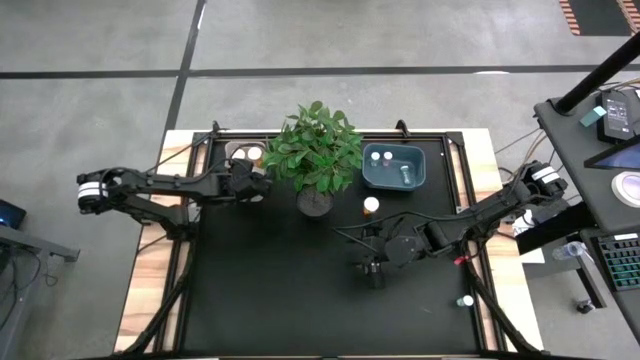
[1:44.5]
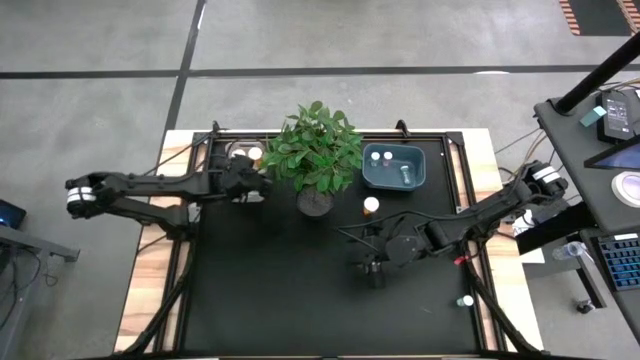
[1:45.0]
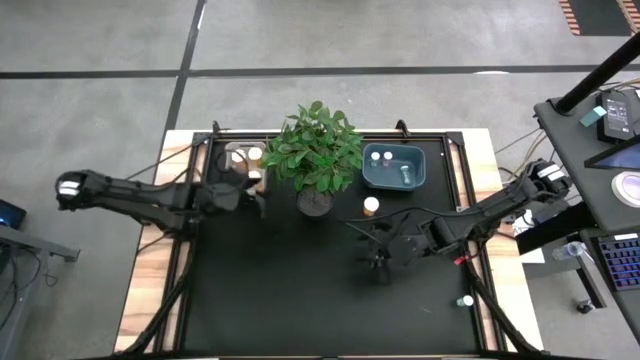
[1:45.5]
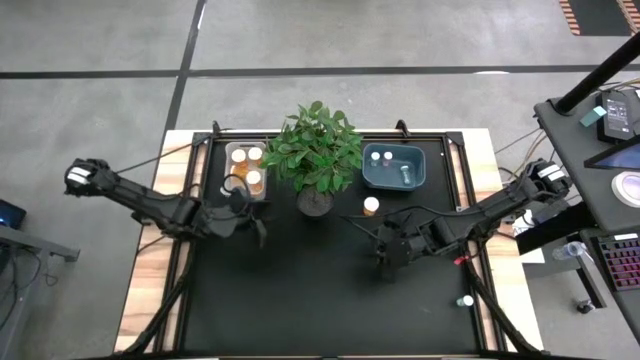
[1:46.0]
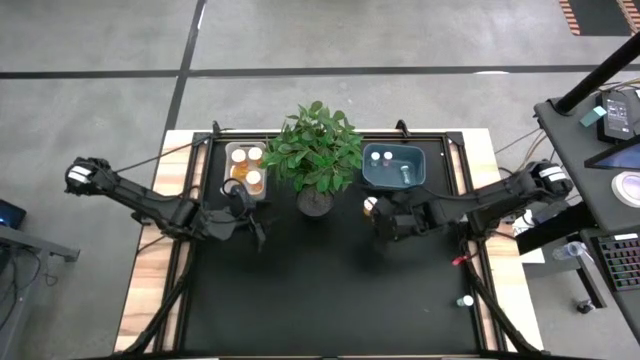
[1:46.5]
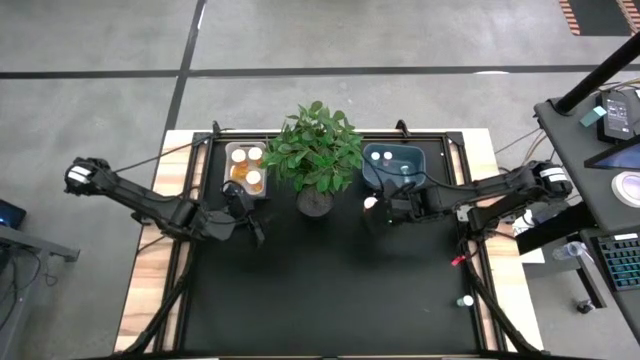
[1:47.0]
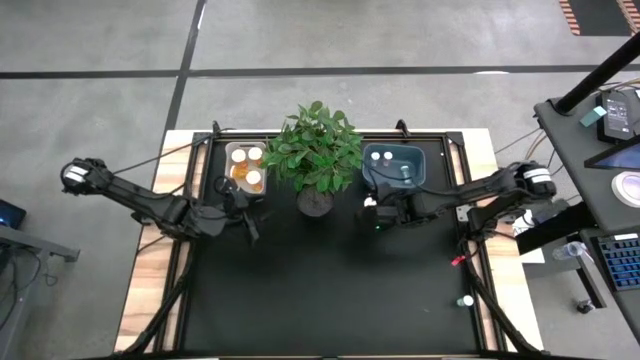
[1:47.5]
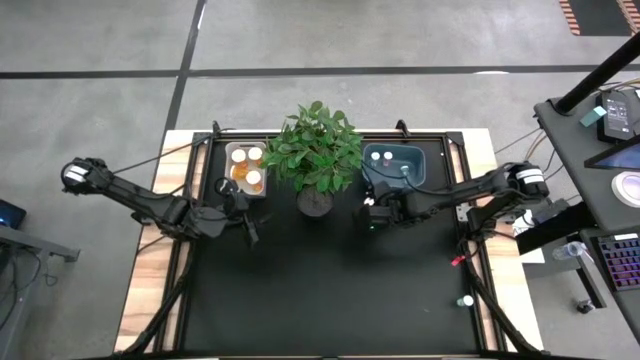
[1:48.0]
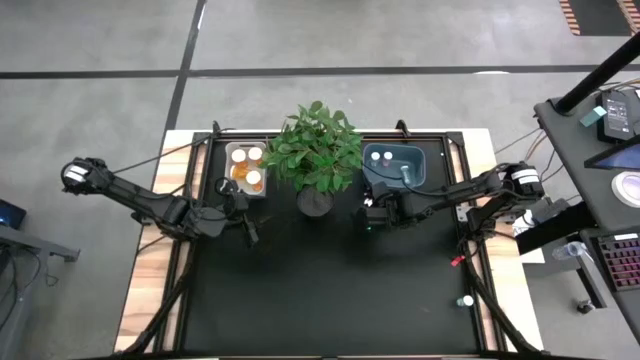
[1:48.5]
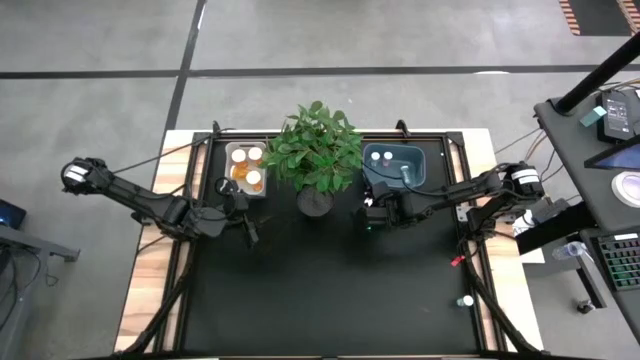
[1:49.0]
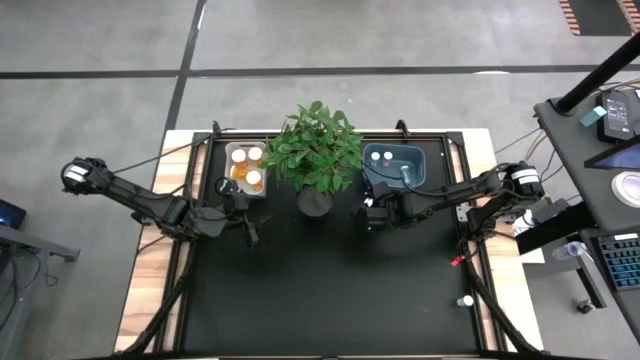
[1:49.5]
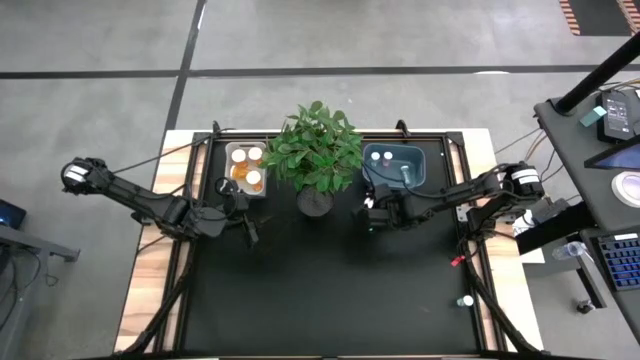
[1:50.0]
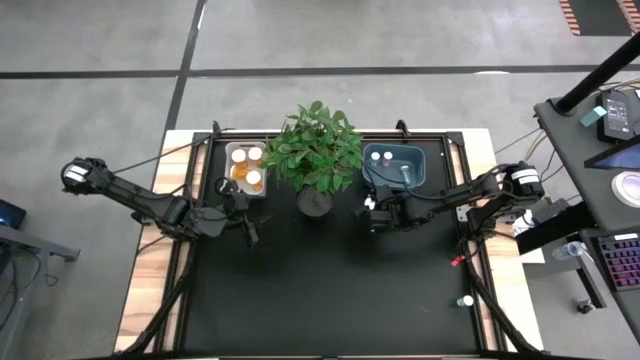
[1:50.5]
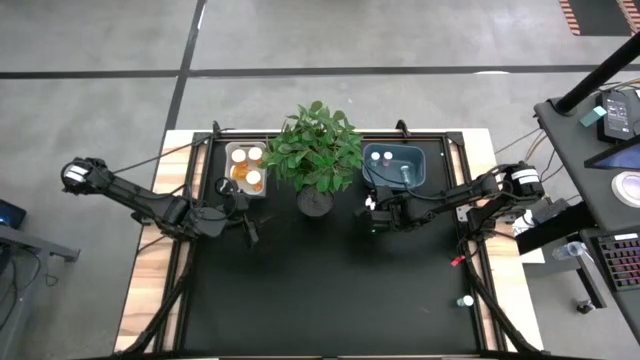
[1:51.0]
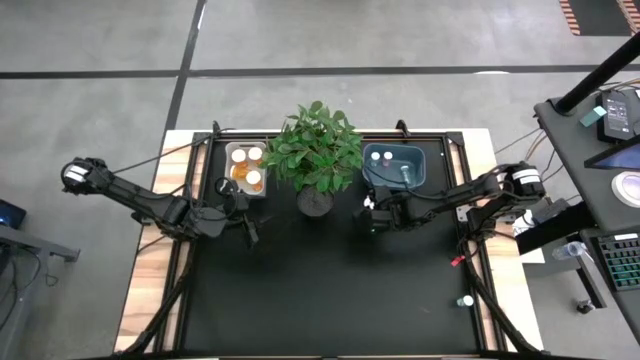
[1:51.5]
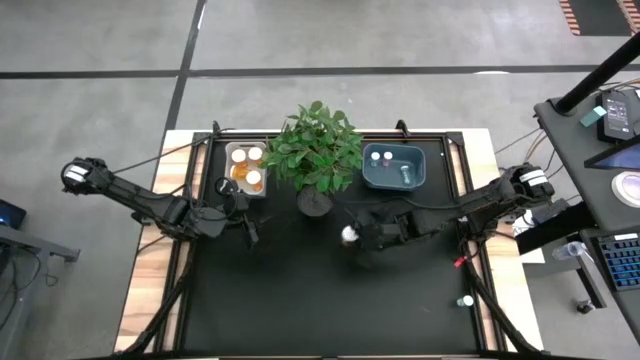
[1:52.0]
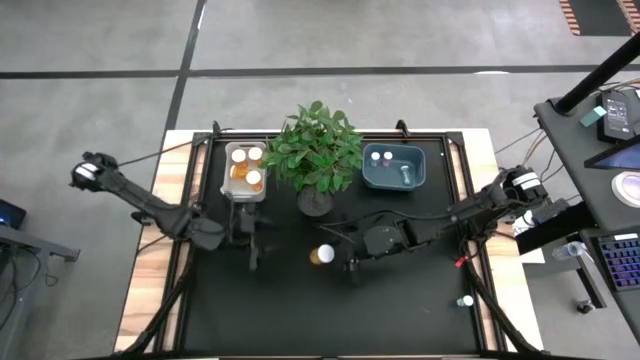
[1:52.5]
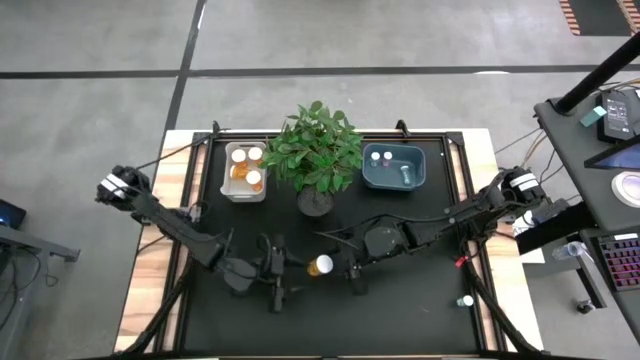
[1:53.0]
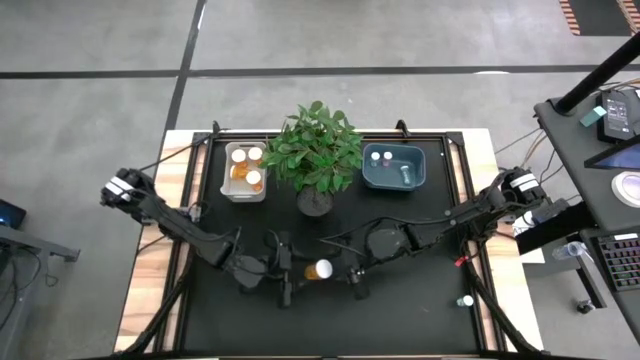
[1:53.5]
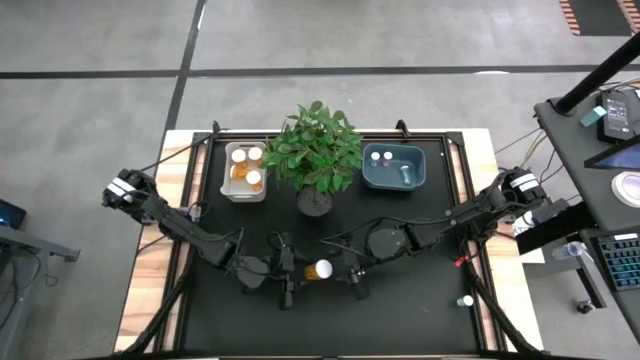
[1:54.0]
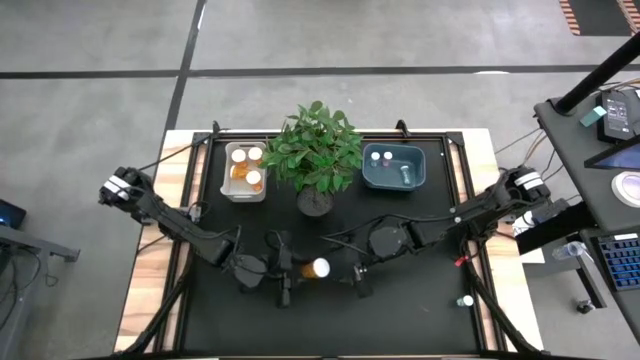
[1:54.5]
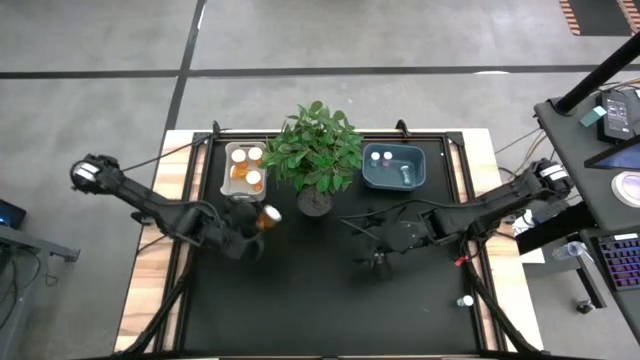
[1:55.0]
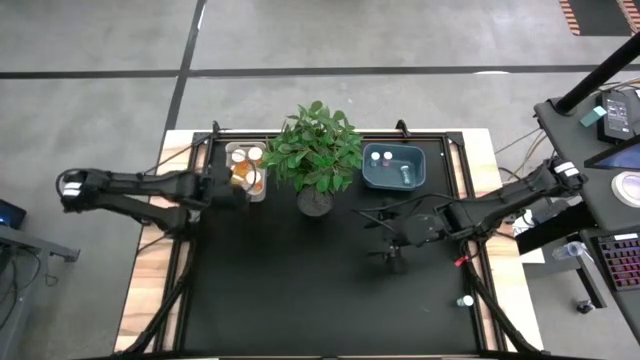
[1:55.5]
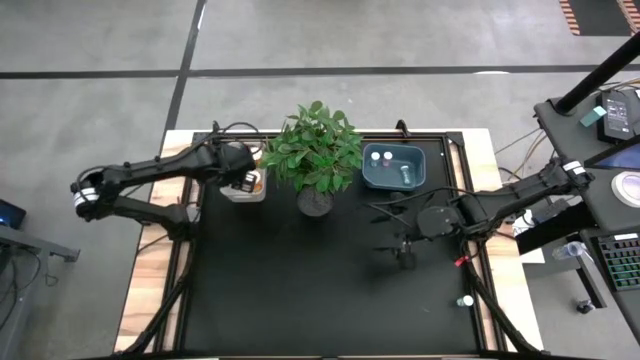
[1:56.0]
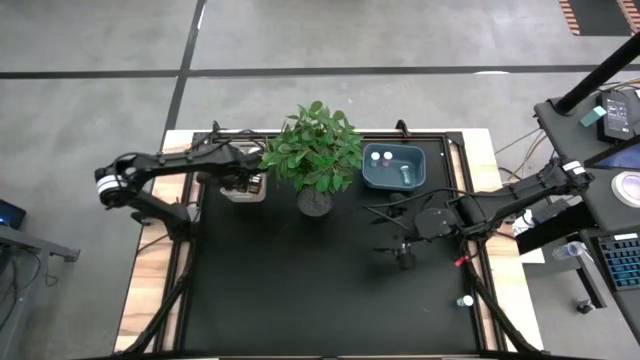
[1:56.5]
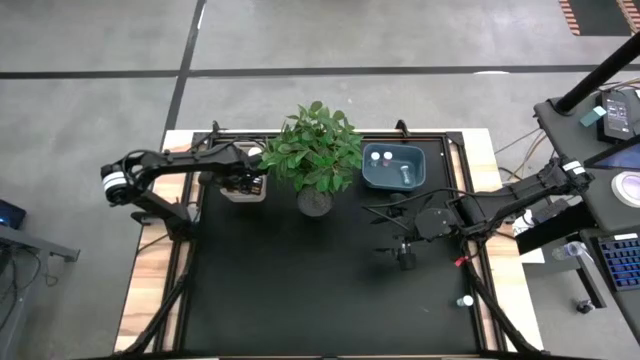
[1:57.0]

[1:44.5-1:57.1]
Task: Pick and place medicine bottles into bin by pill shape (circle, oval)
Put the big orange pill bottle into the white bin

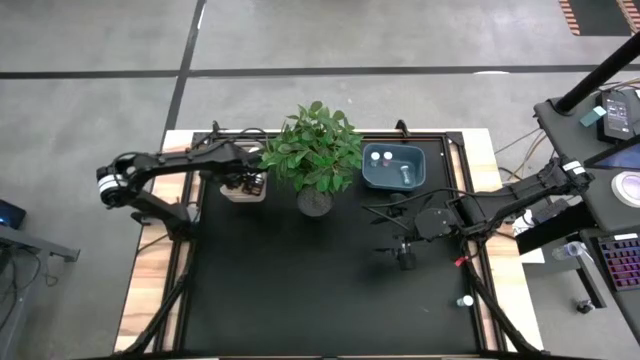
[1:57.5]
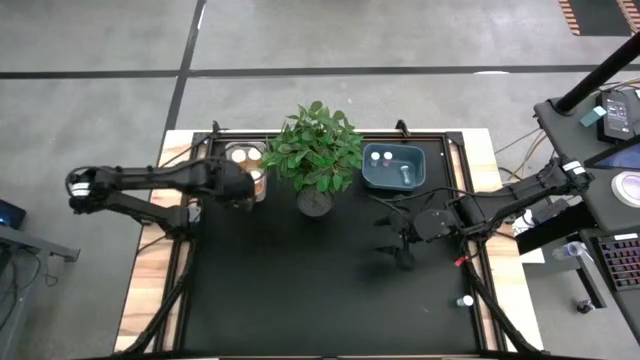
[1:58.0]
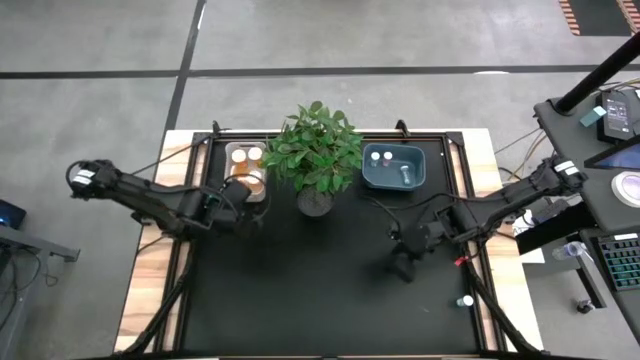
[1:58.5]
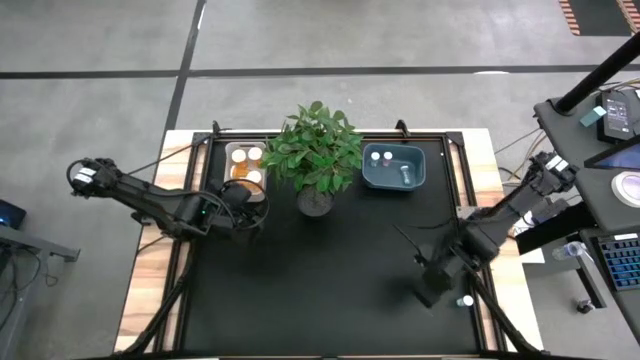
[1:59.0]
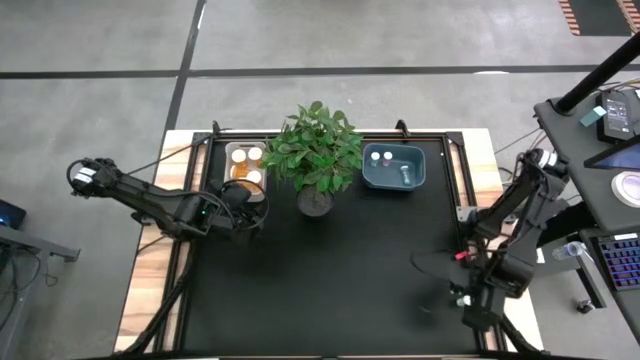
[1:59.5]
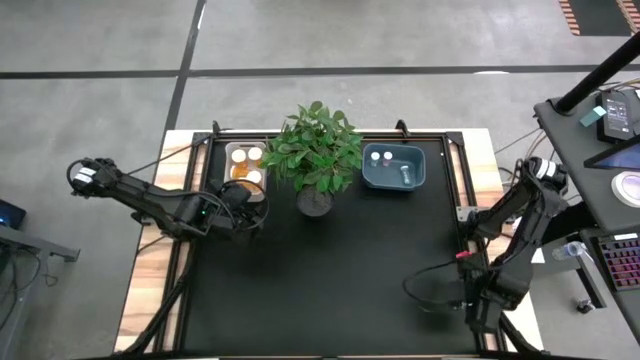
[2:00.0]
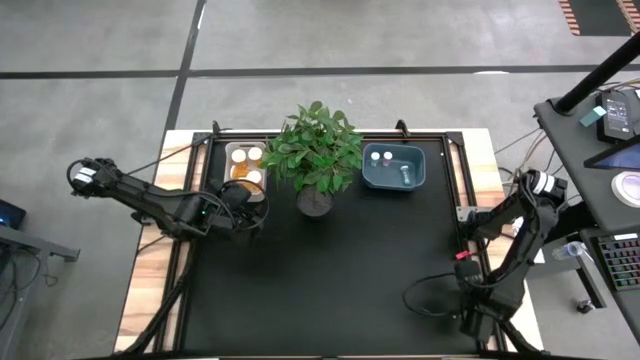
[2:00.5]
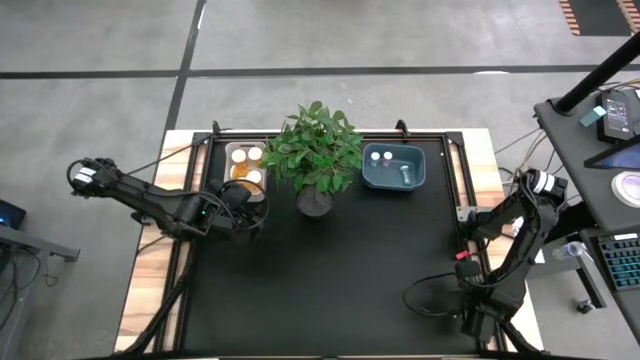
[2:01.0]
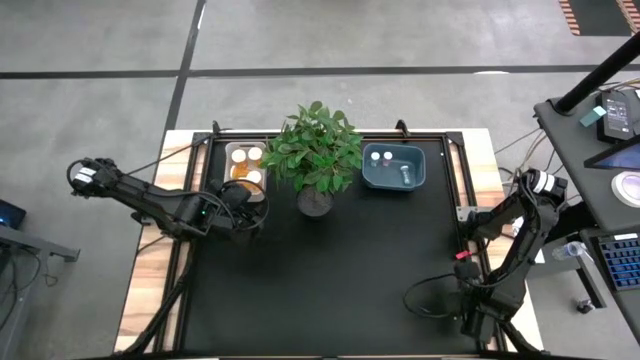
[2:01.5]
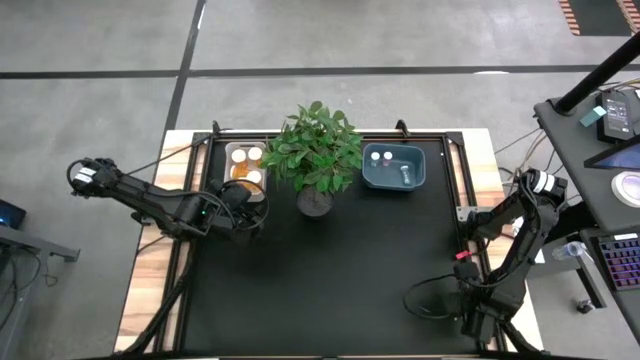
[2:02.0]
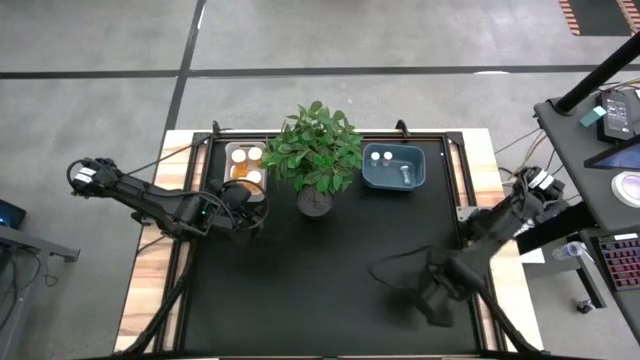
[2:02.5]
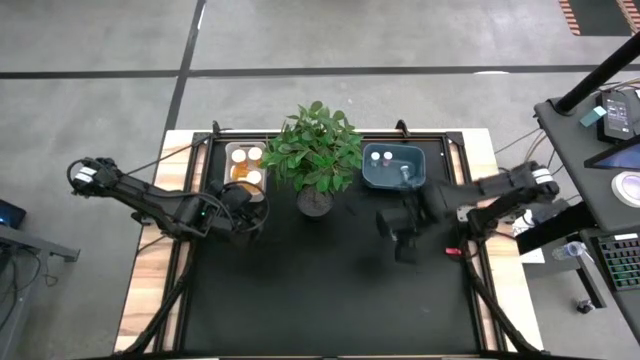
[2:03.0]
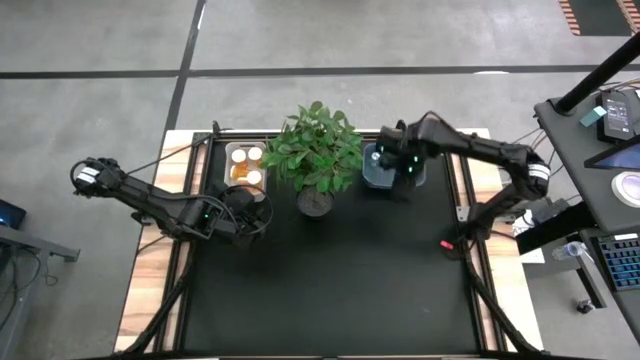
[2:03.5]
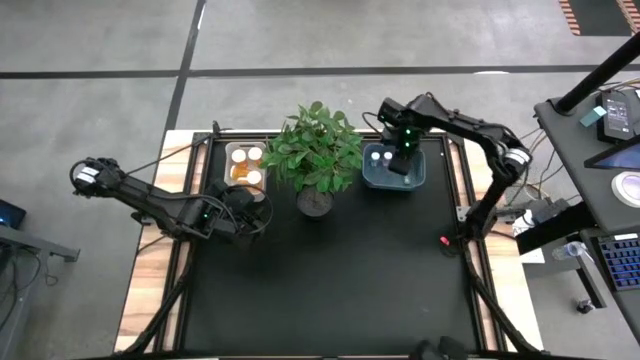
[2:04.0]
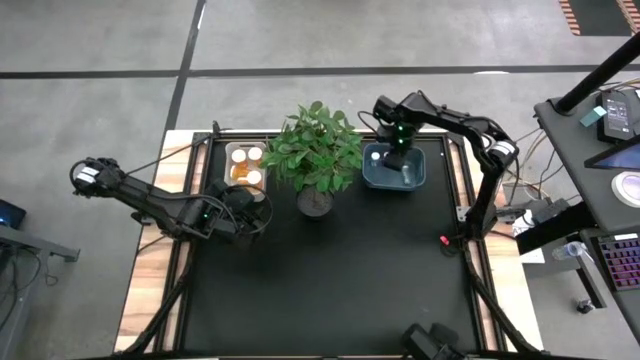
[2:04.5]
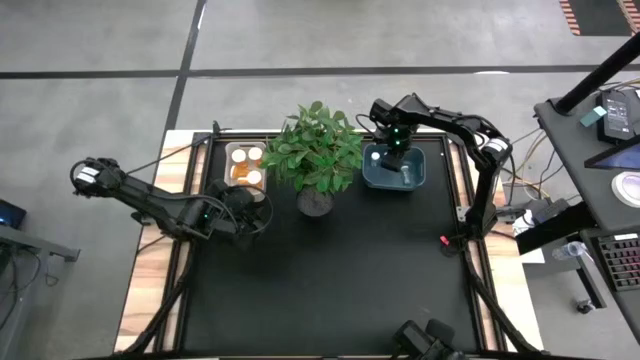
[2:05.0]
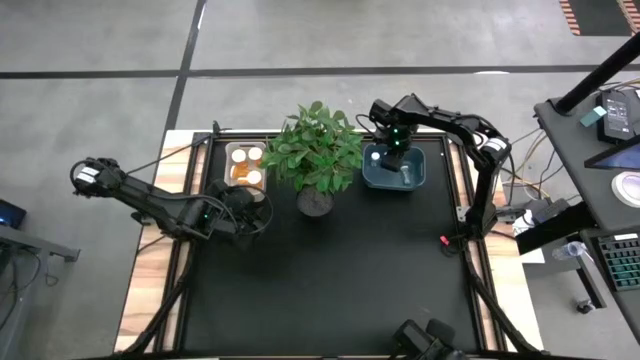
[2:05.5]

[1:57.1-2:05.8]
Put the small blue pill bottle into the blue bin
